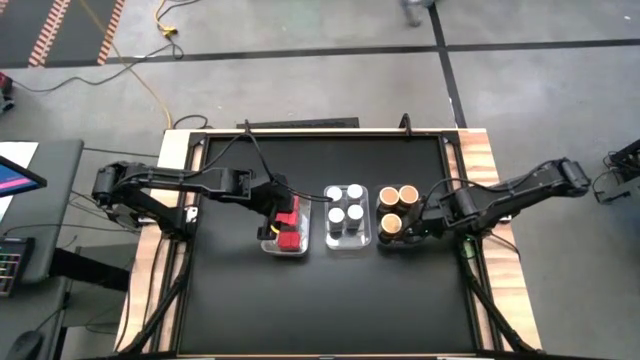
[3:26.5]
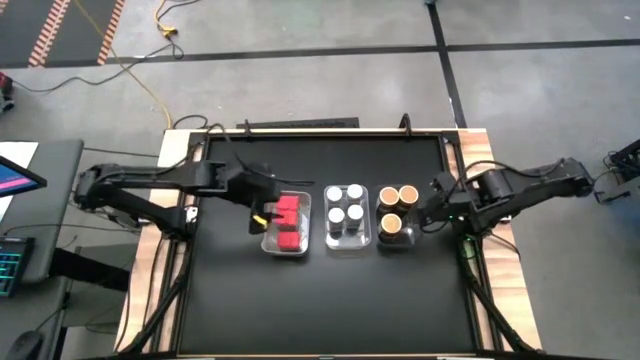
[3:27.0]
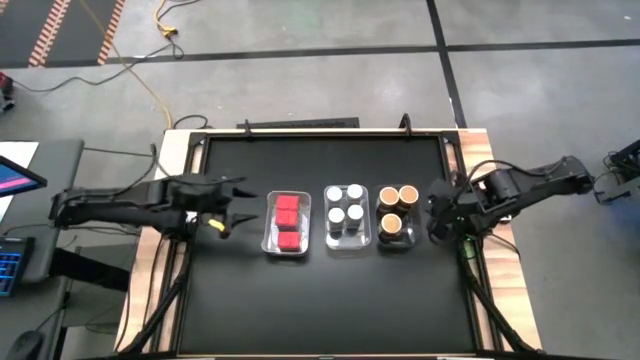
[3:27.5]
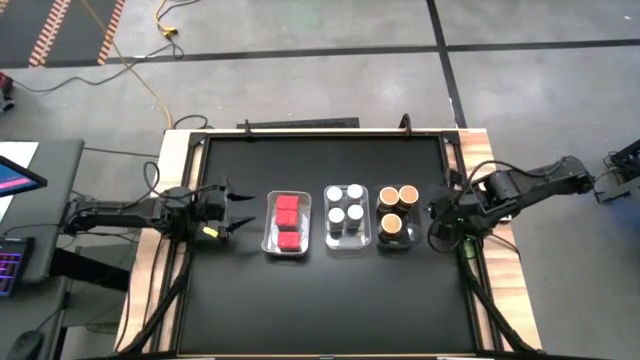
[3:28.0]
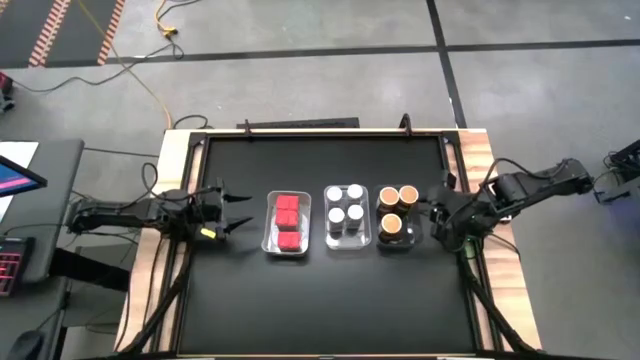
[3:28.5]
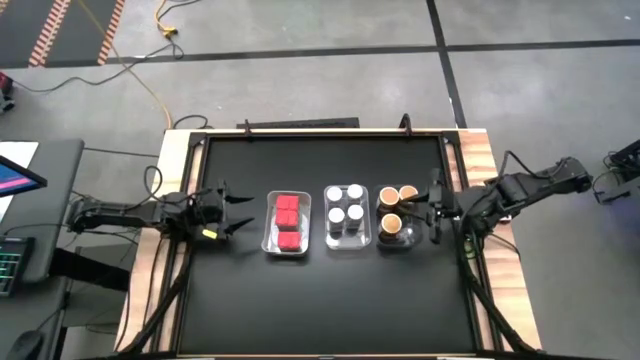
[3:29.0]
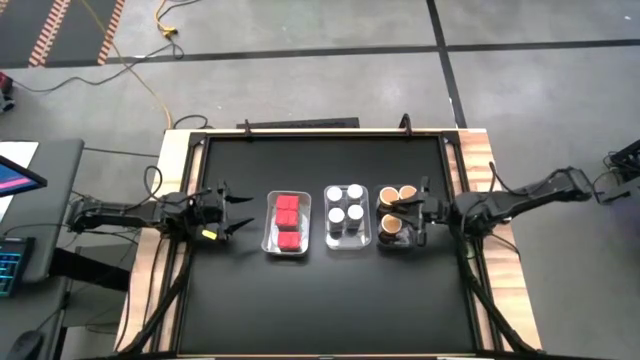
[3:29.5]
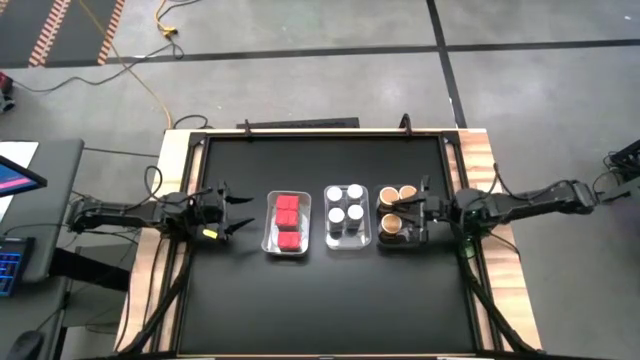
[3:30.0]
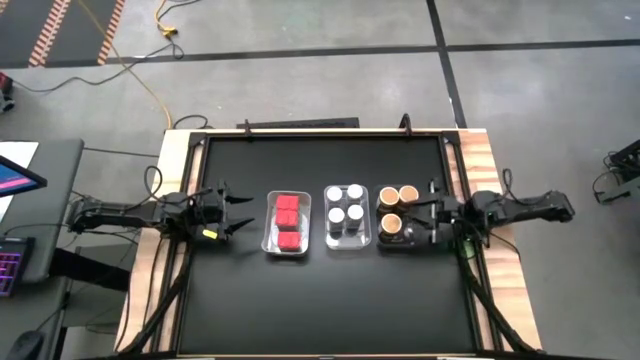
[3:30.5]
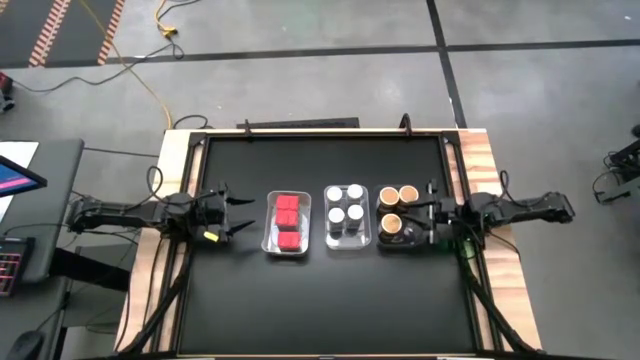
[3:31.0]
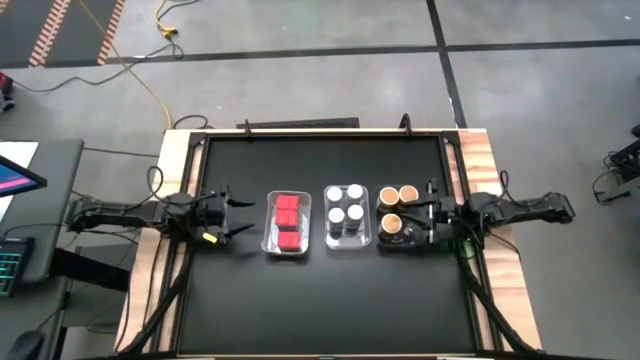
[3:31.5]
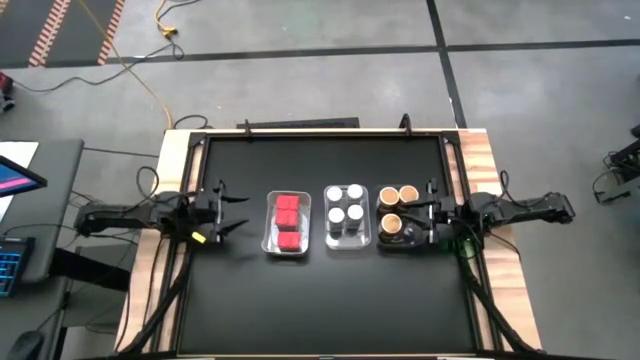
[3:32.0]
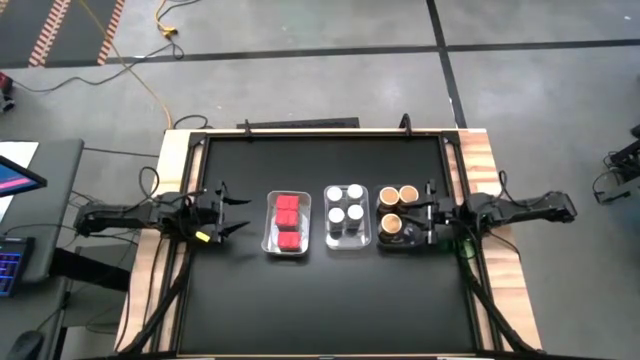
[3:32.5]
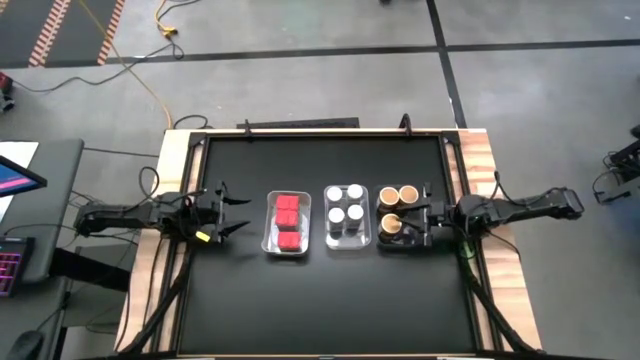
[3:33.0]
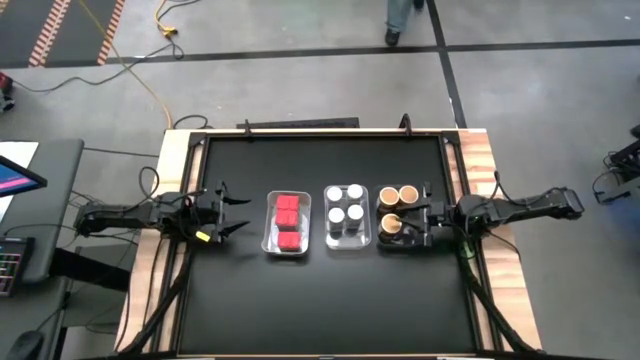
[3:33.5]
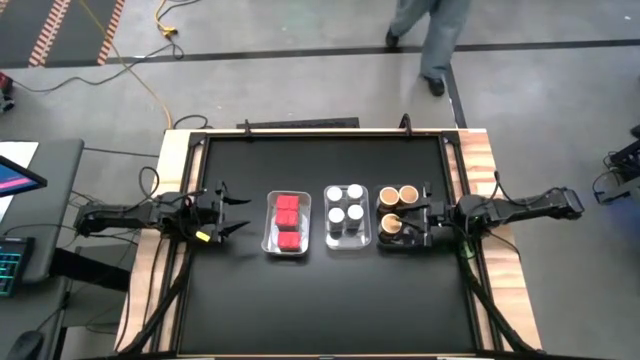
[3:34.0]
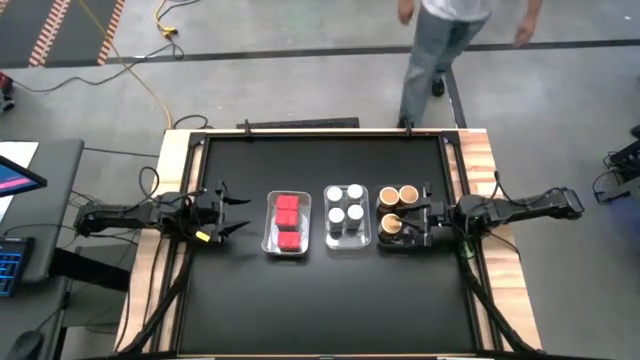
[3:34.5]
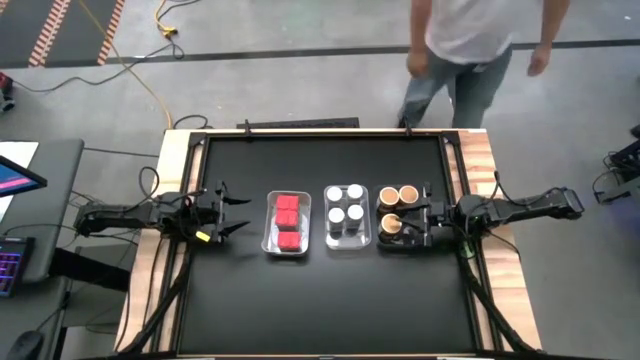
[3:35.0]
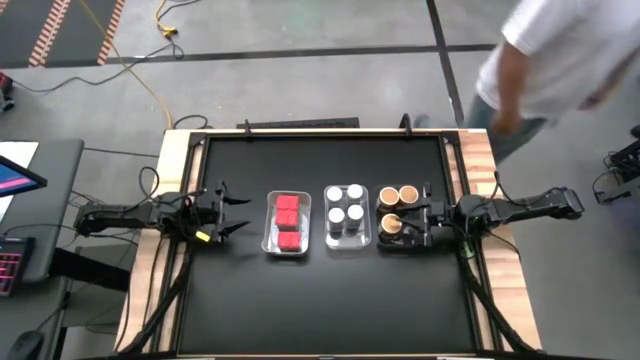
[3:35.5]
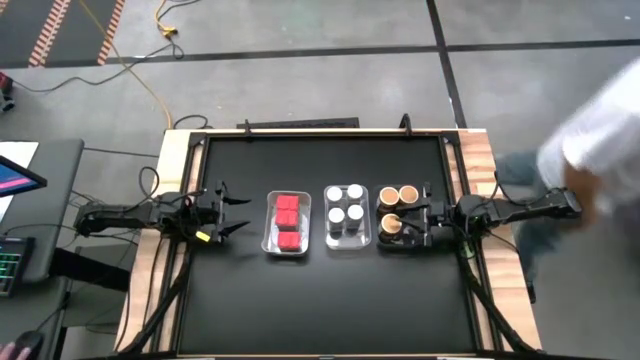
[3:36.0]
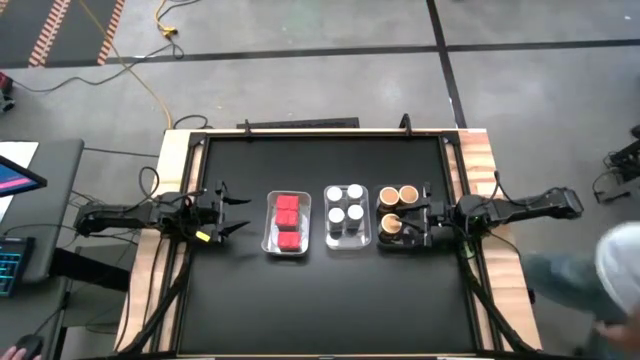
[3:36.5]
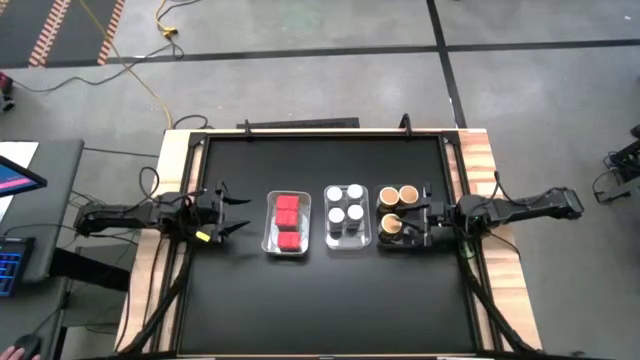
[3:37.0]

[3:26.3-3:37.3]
Task: Sort spices by type
Return to Home Position

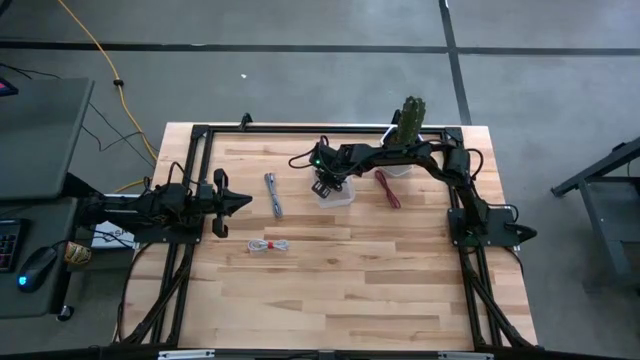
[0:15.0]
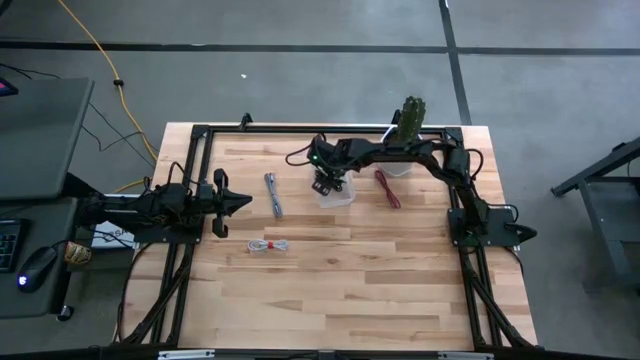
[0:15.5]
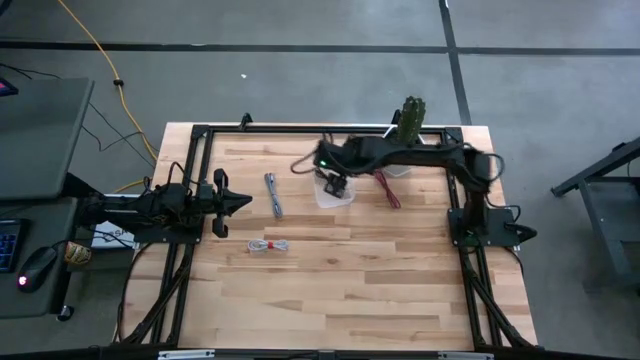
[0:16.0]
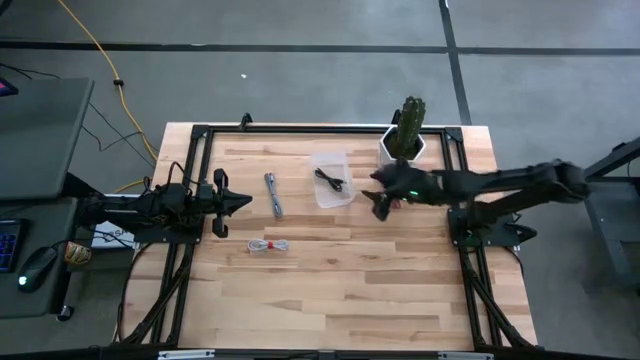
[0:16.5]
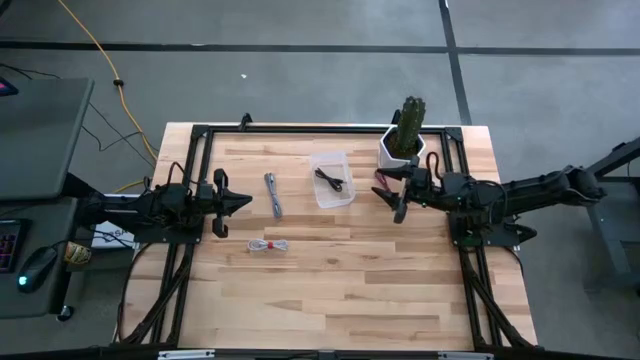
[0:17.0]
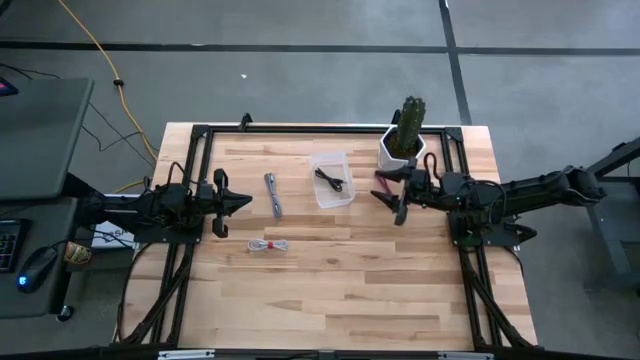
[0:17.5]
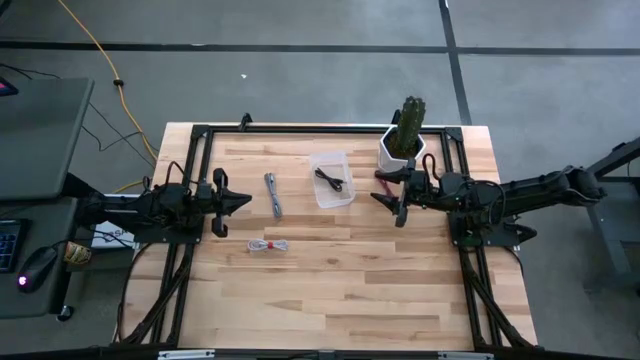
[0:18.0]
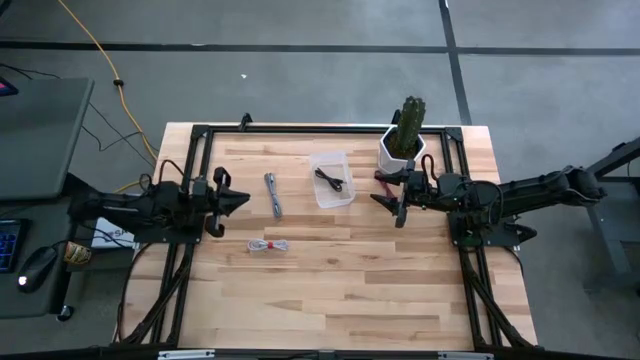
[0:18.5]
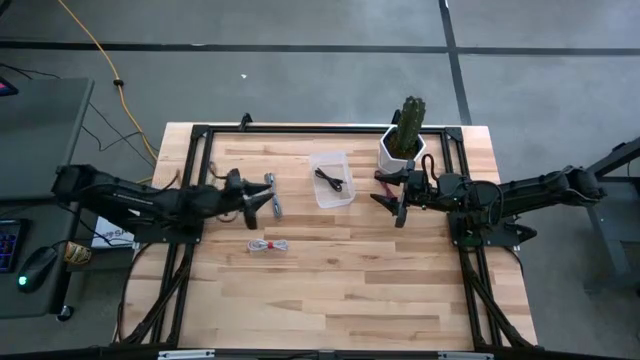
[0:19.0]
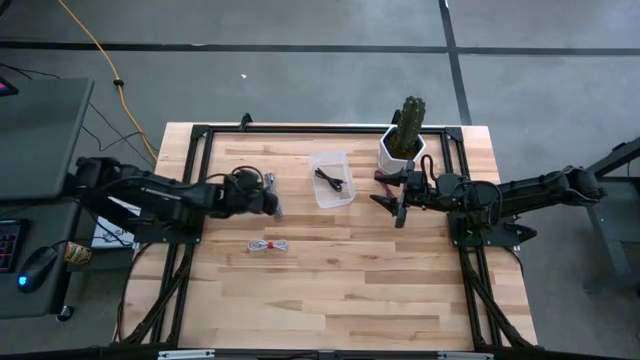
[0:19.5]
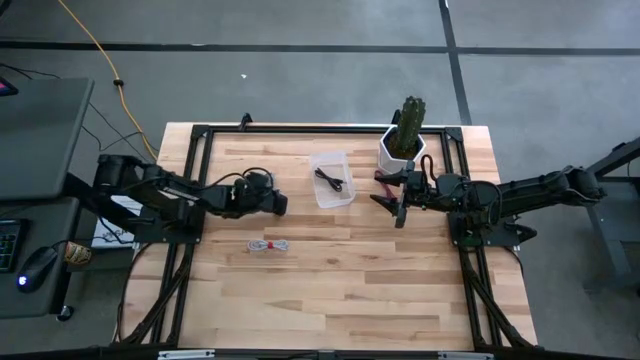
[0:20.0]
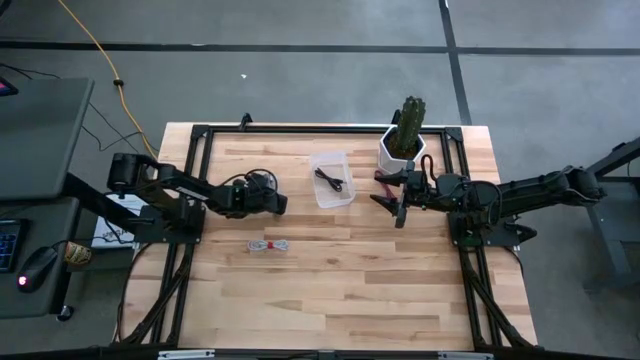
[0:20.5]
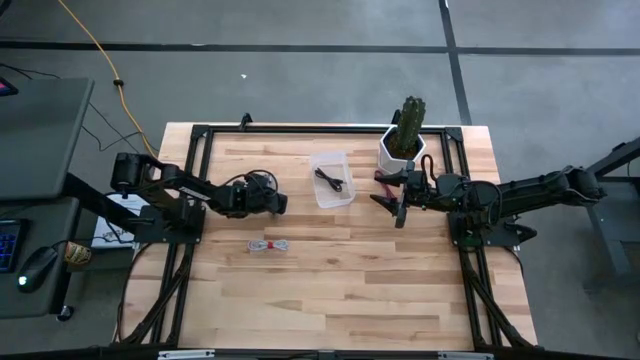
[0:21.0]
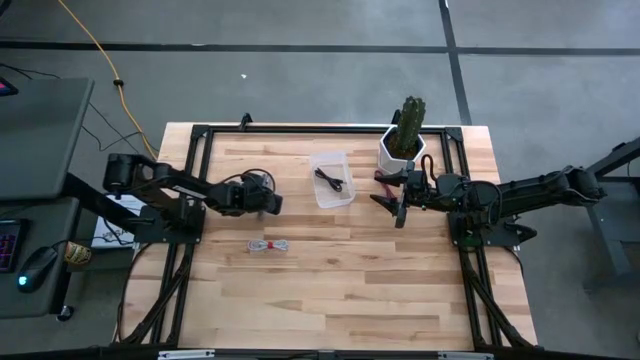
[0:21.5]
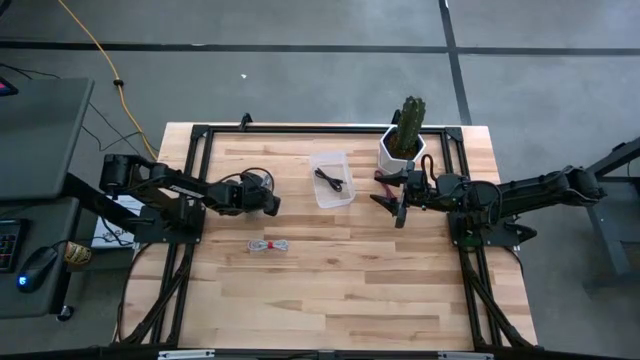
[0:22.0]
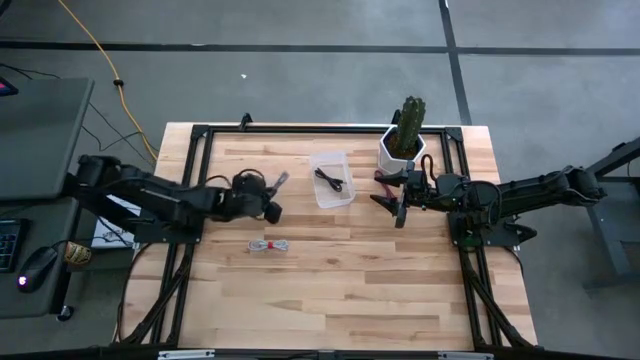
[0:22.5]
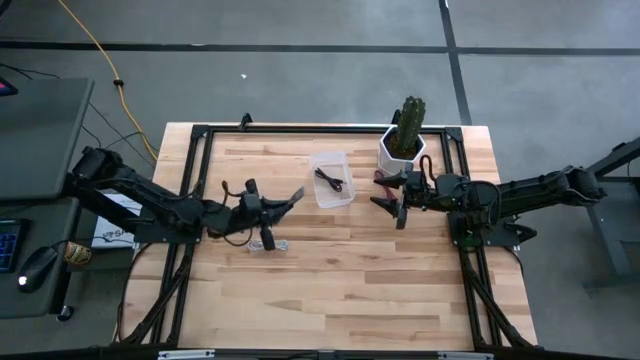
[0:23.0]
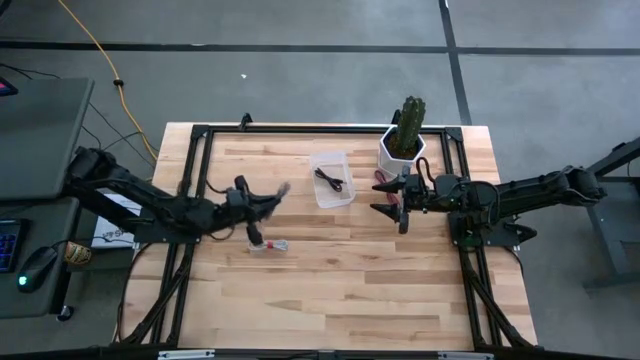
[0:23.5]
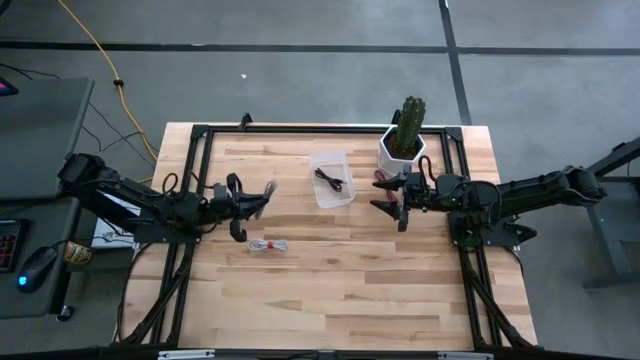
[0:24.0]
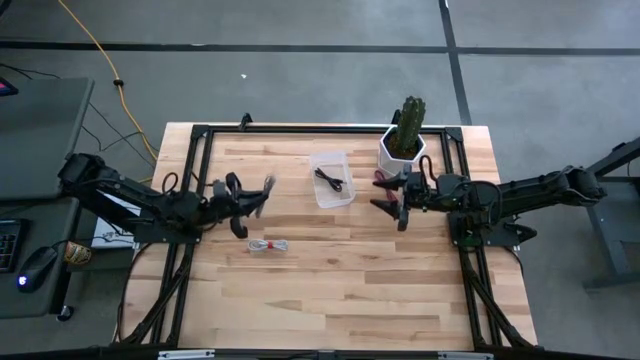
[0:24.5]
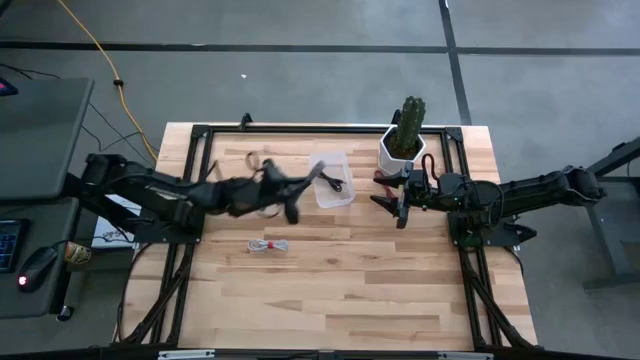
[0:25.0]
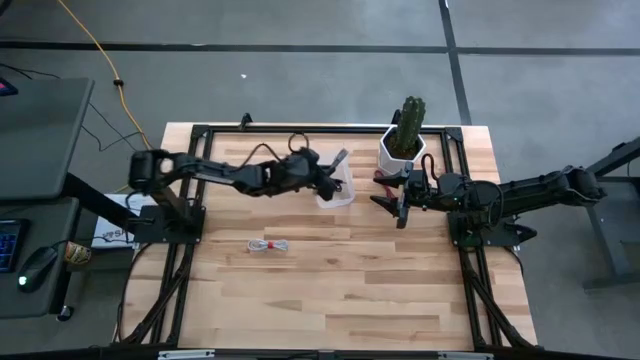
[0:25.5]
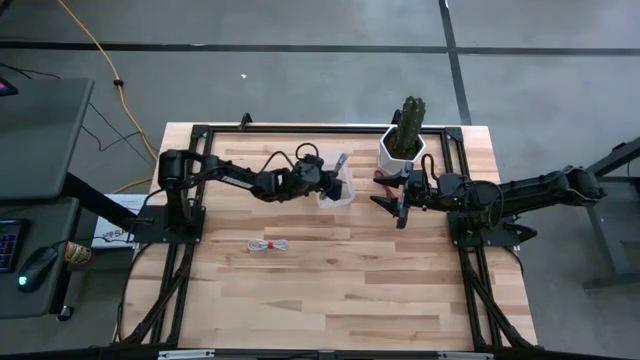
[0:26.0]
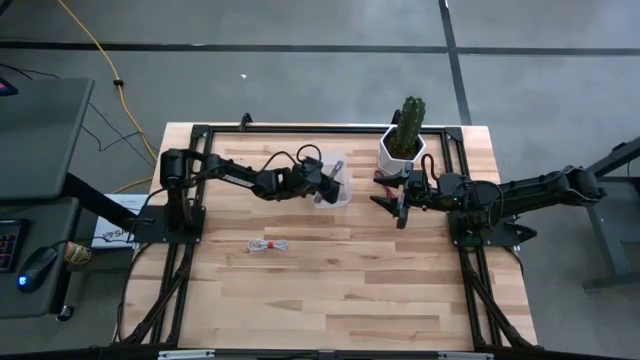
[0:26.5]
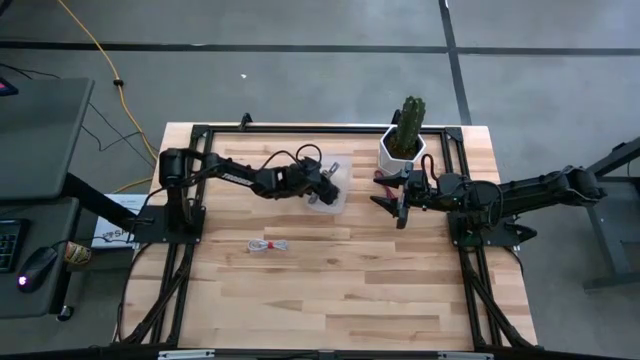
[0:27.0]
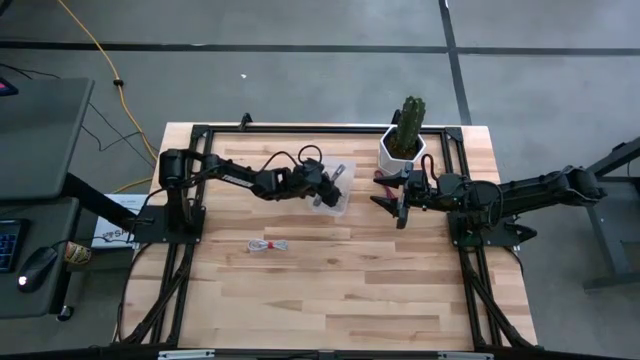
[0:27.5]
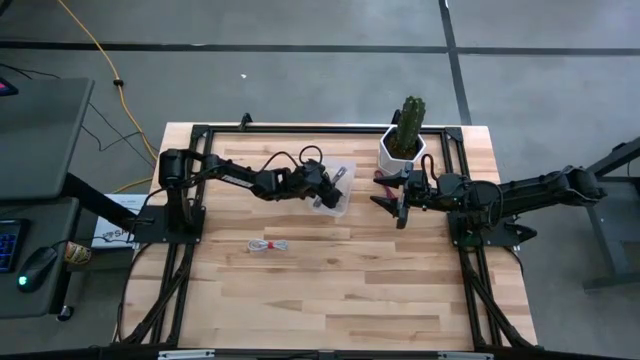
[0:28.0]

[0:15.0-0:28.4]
Task: Pick and place USB-C Cables
Put the black white charger cable into the transparent bin
